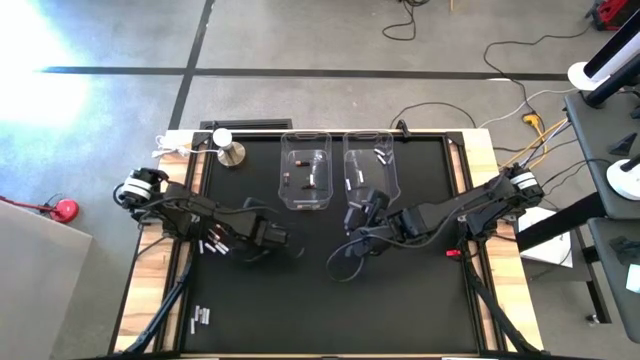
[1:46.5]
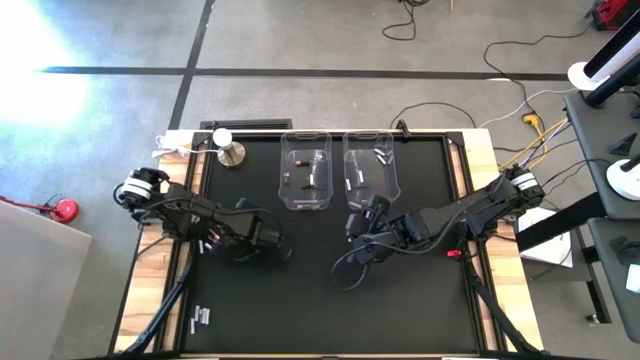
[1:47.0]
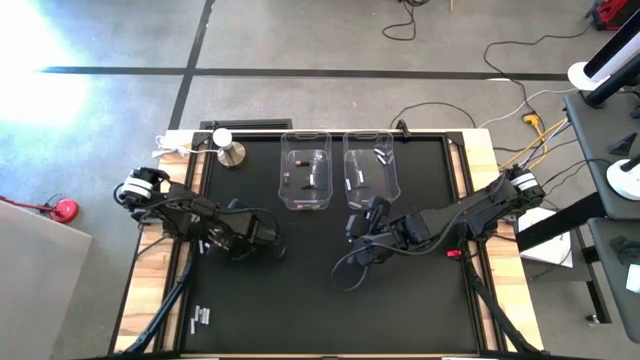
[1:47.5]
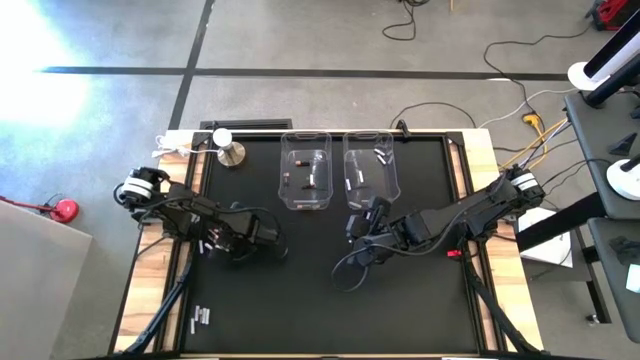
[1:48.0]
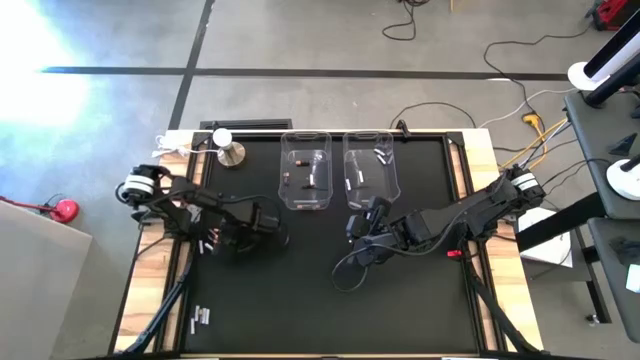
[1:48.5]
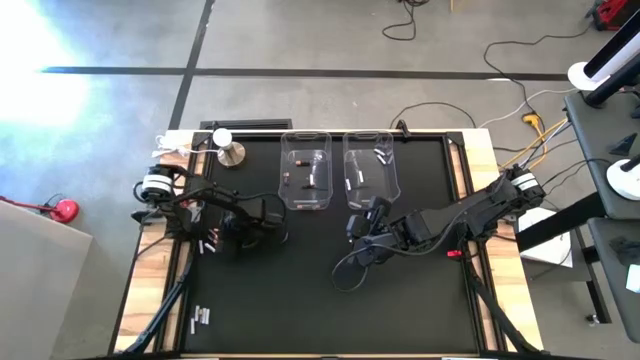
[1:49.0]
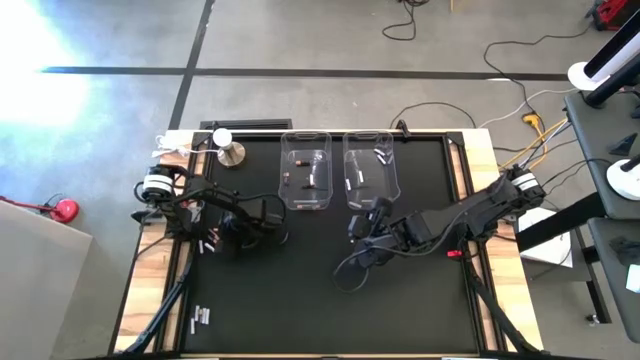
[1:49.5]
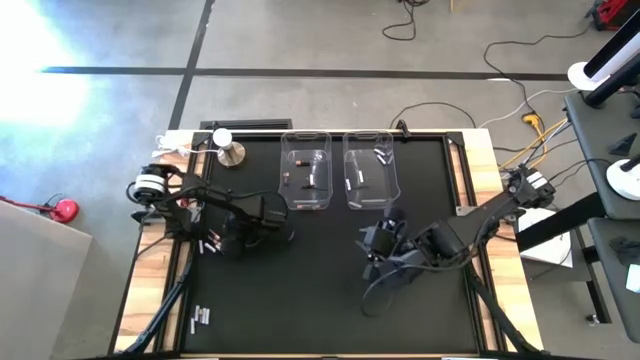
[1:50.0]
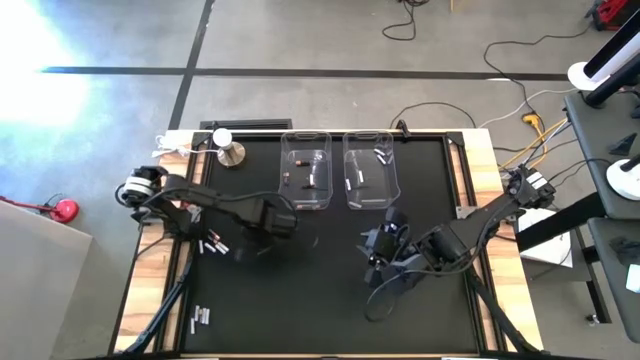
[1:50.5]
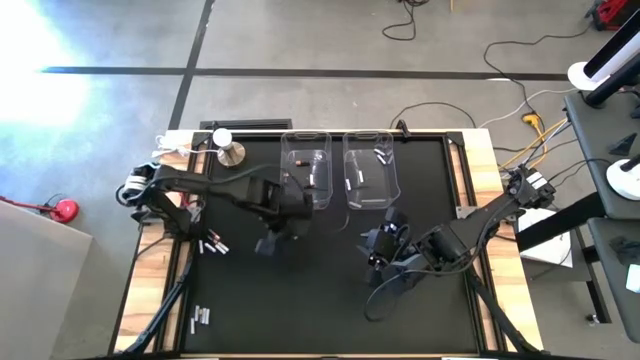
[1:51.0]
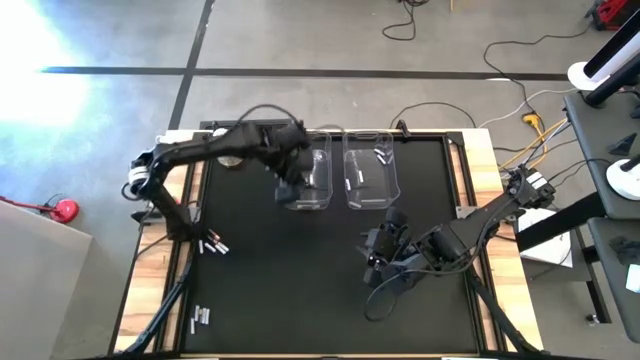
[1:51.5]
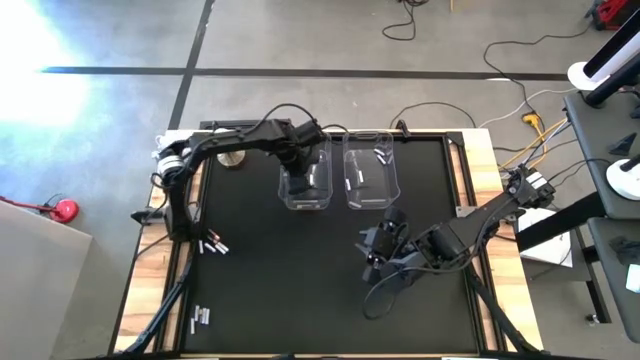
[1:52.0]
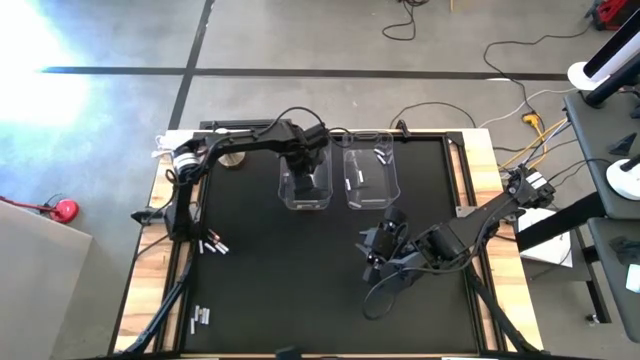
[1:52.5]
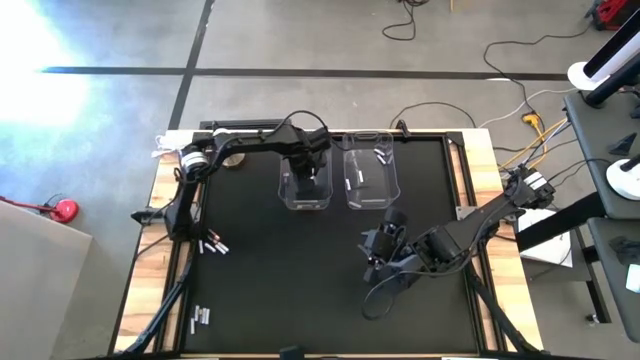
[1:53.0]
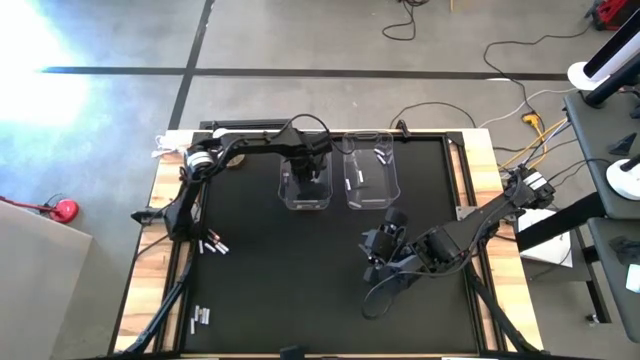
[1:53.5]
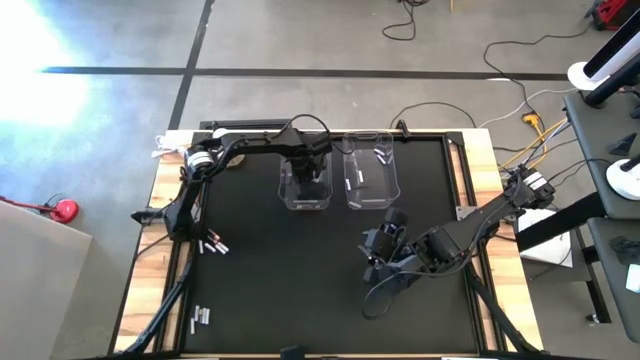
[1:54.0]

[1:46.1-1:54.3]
Task: Sort batteries
Put the black battery into the left transparent bin

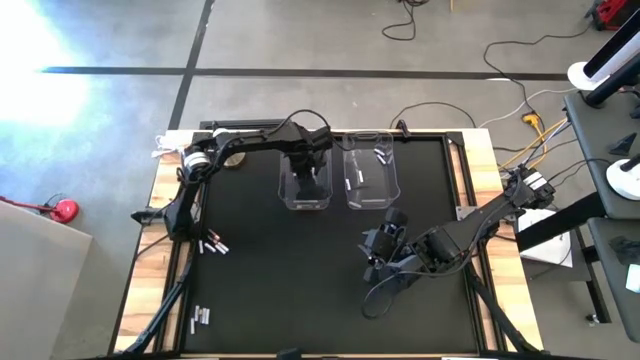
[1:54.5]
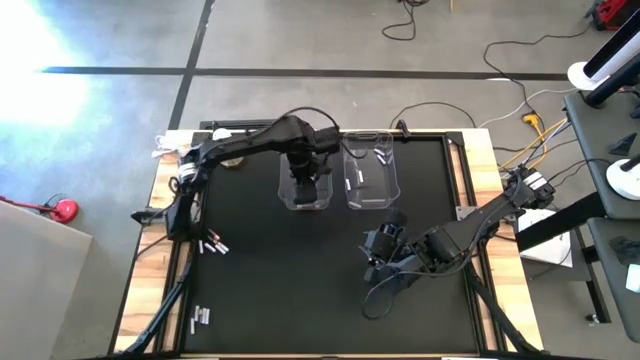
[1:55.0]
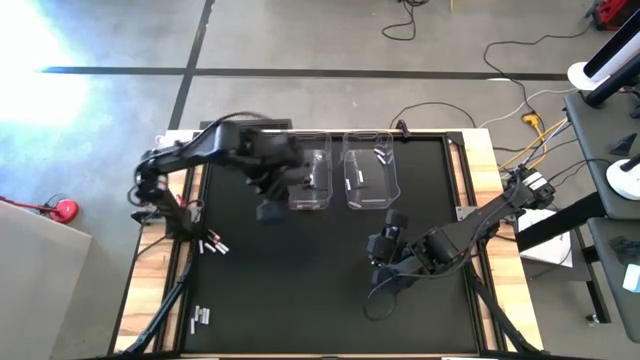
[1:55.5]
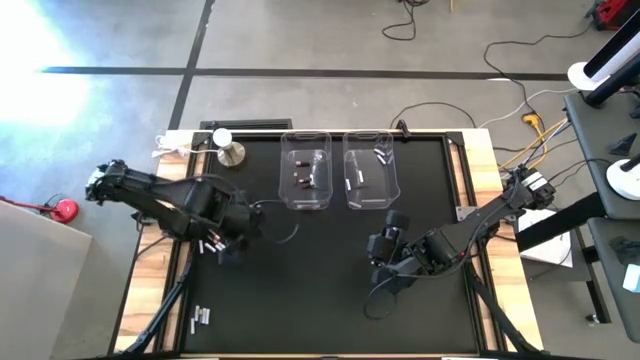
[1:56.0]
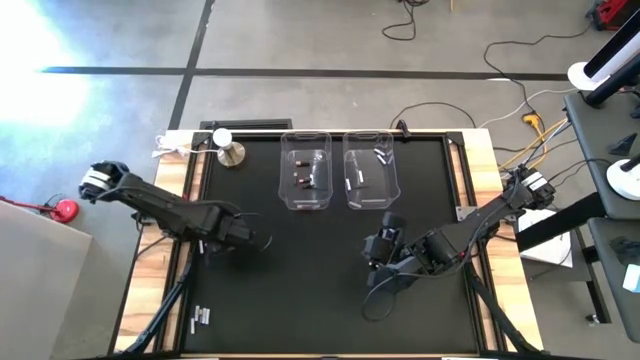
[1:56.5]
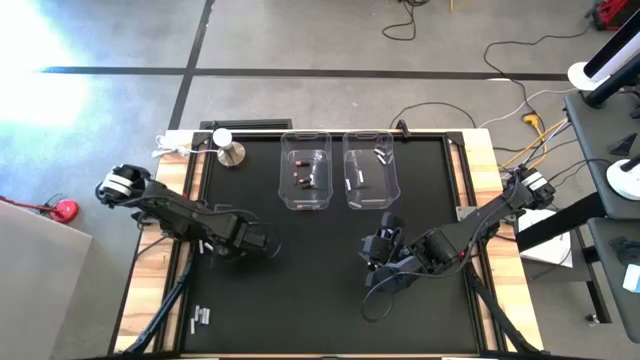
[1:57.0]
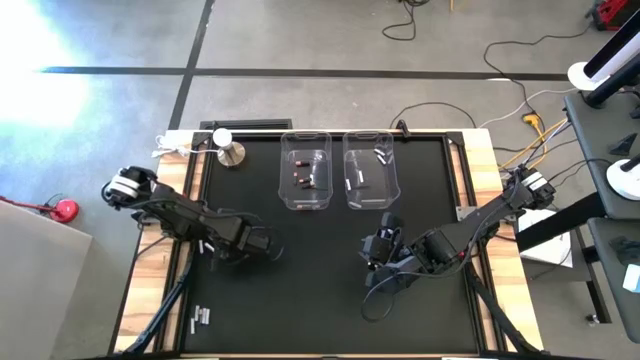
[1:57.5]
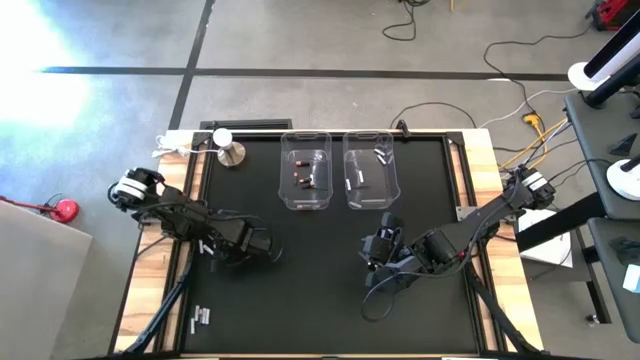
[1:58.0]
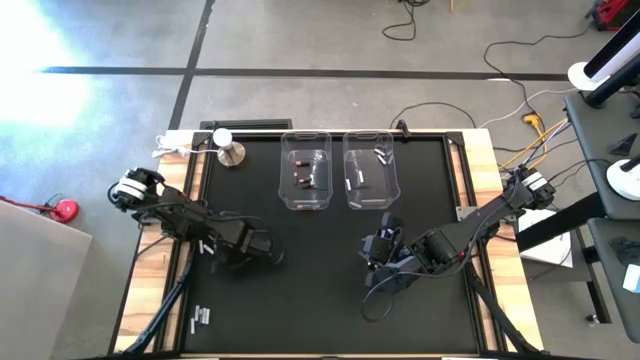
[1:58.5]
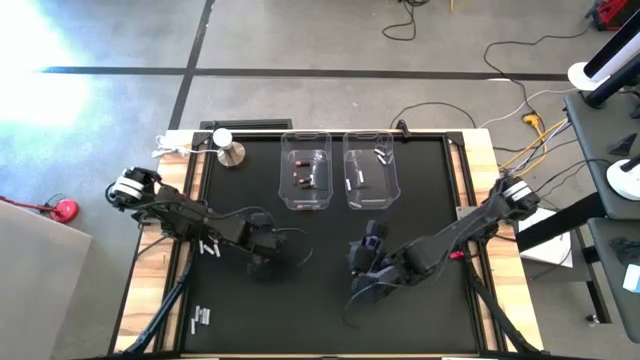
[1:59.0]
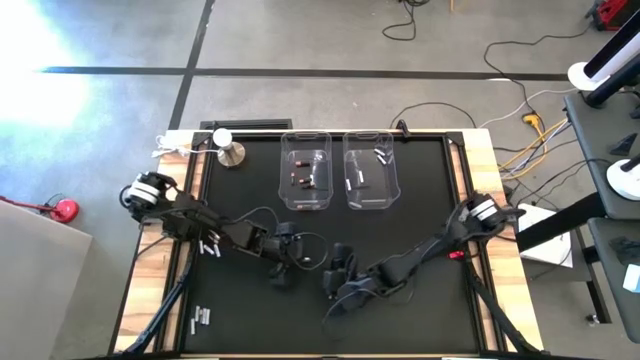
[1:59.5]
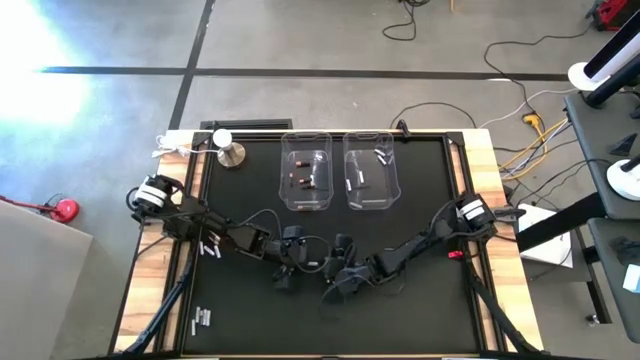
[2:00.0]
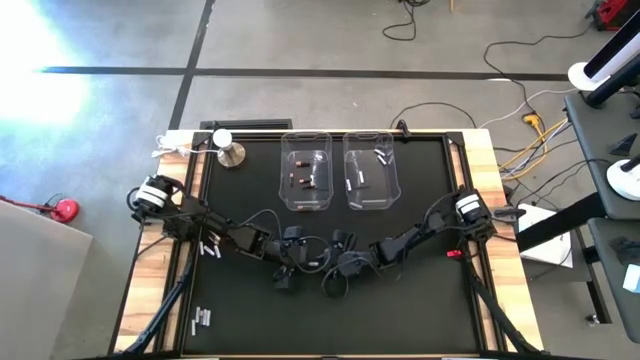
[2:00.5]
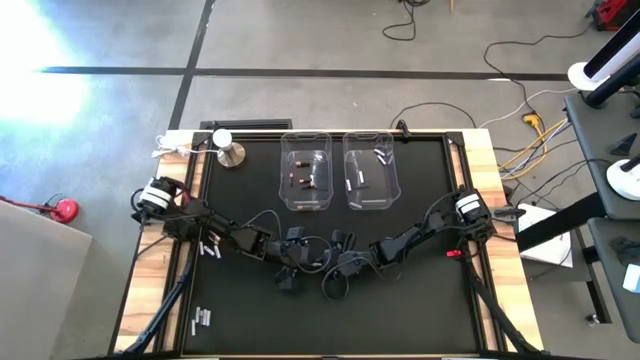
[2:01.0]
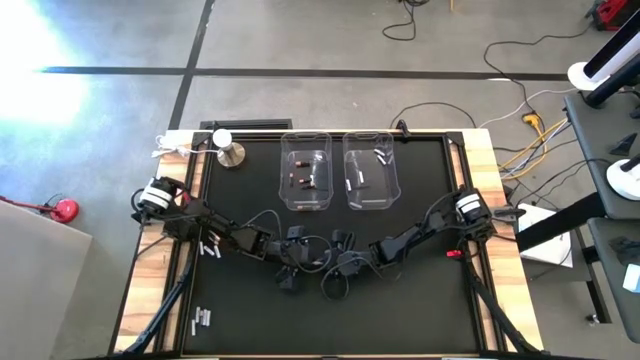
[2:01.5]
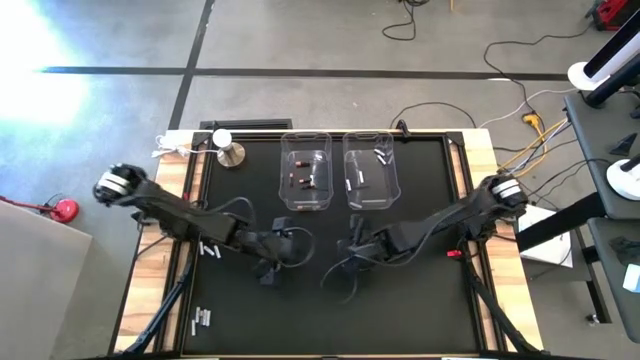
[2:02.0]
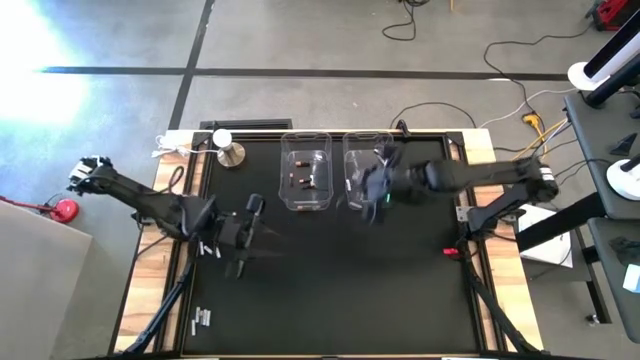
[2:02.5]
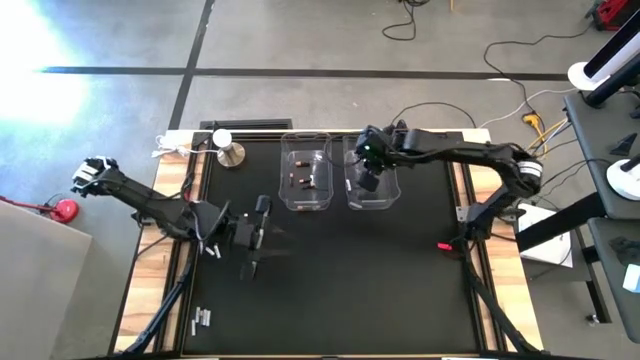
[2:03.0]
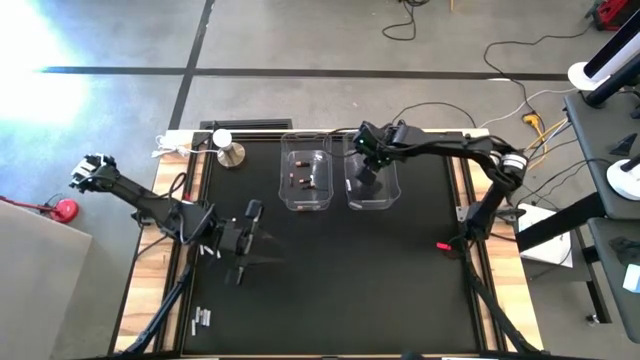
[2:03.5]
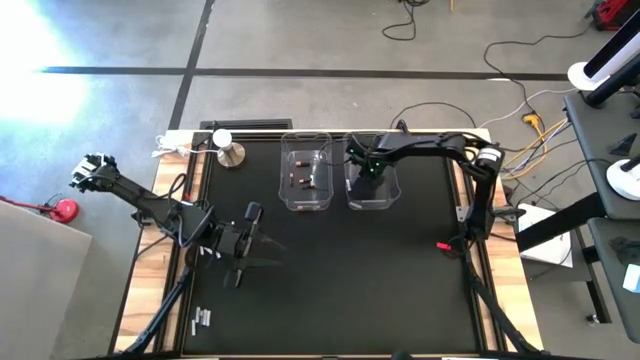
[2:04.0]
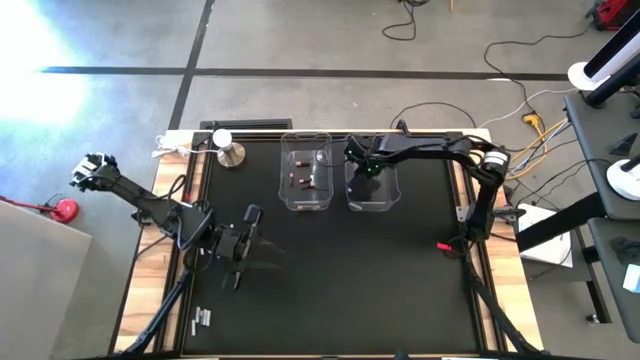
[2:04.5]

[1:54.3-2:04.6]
Put the white battery into the right transparent bin

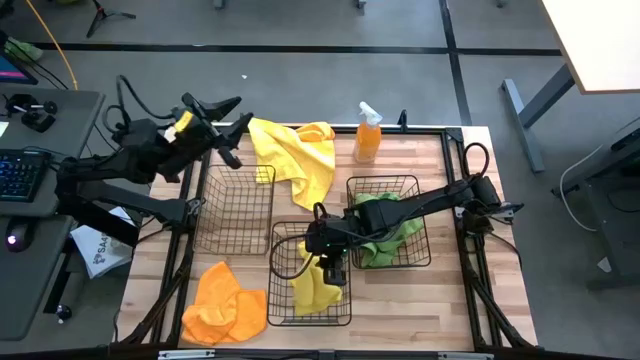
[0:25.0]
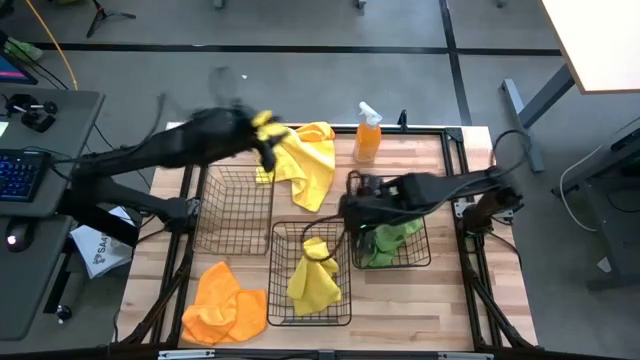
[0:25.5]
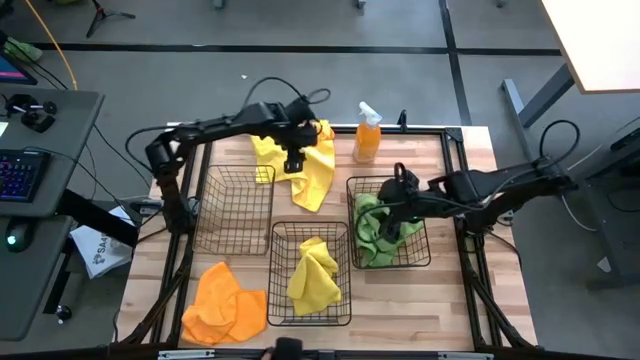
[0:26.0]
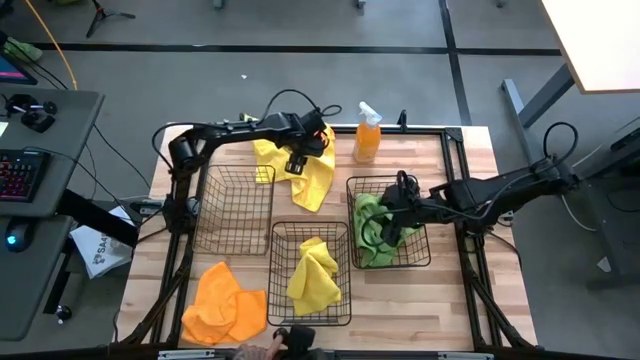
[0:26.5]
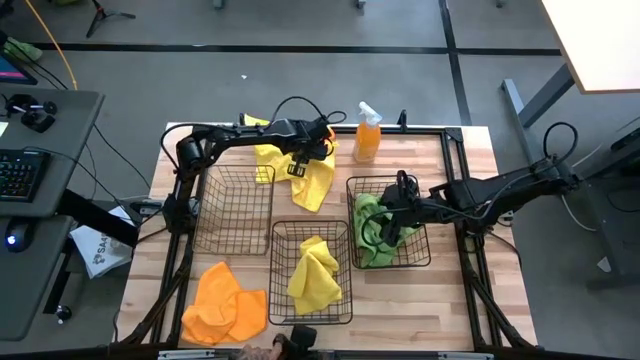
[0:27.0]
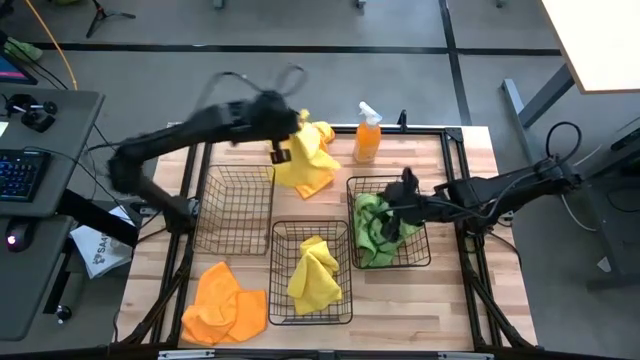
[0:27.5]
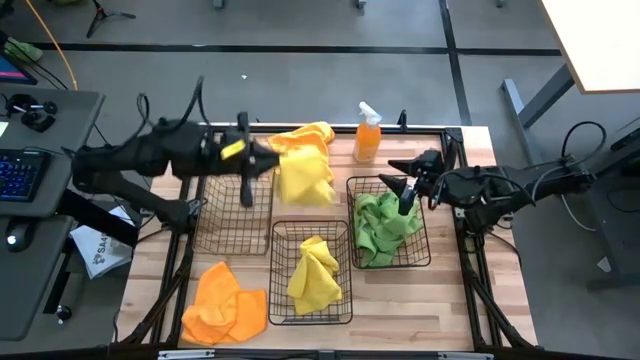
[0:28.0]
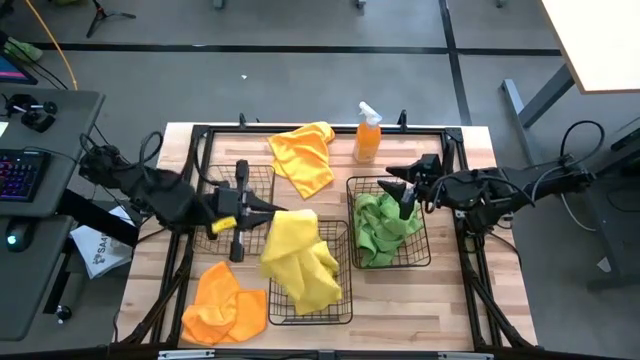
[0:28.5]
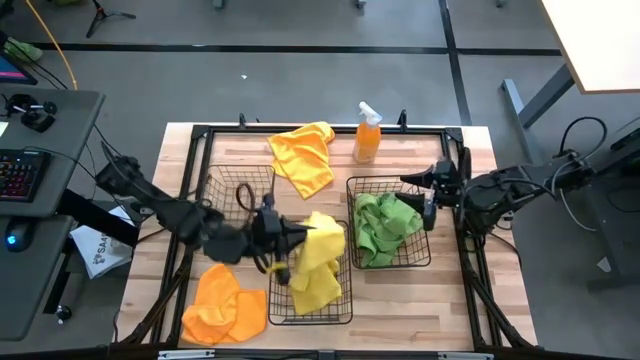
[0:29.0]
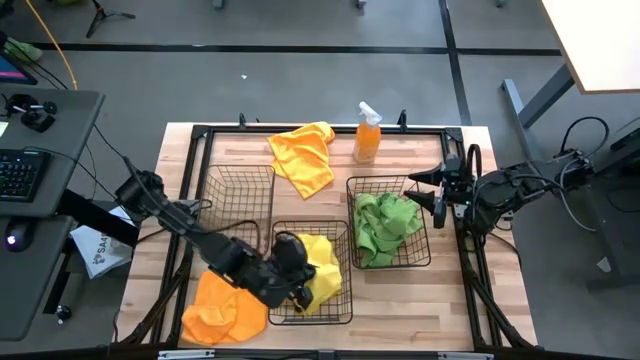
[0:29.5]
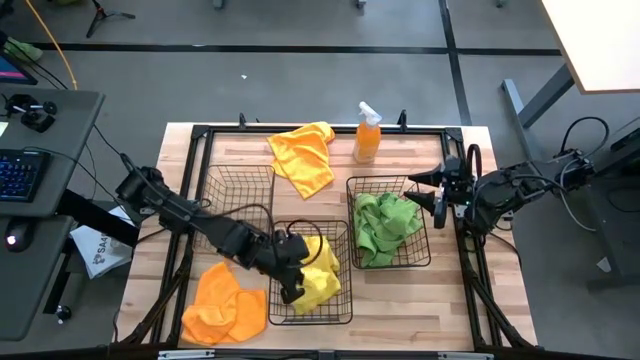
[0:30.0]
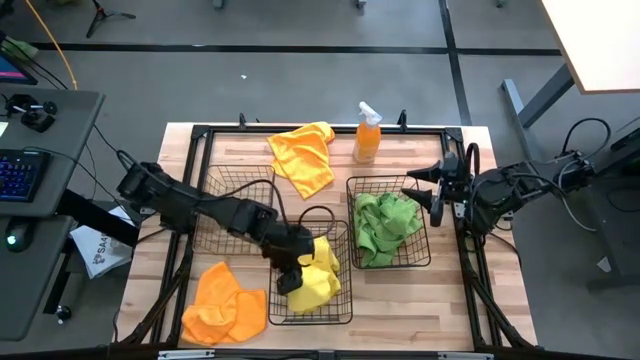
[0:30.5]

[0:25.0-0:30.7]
Task: Sort microfiber towel by color & place in baskets
Put the yellow microfiber cloth into the center basket
